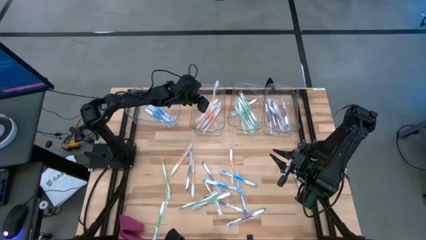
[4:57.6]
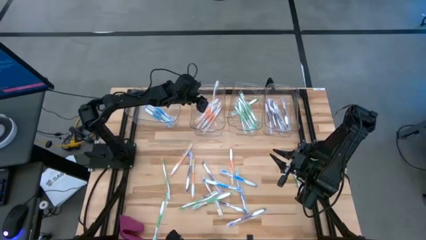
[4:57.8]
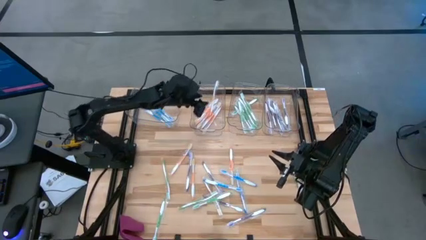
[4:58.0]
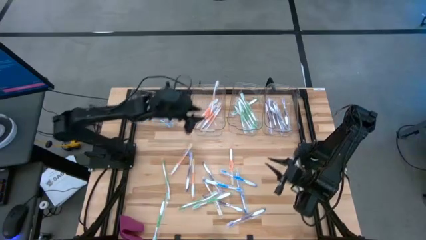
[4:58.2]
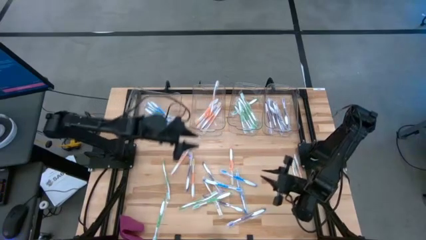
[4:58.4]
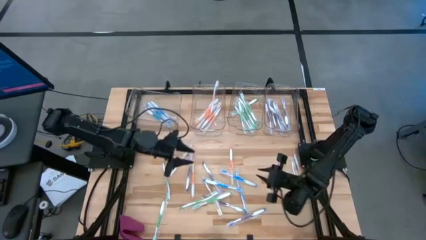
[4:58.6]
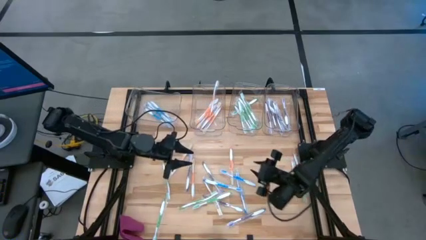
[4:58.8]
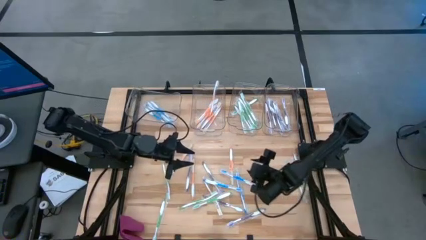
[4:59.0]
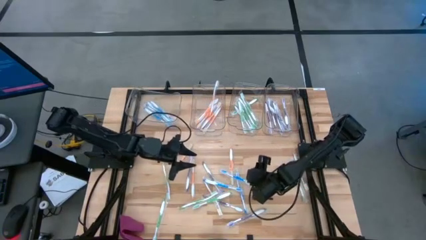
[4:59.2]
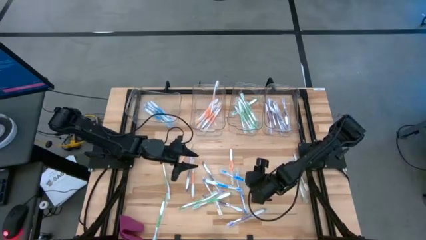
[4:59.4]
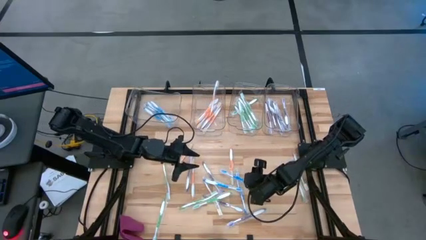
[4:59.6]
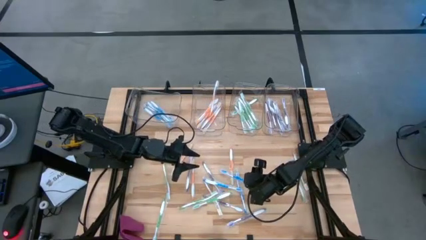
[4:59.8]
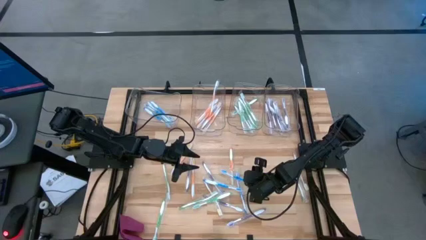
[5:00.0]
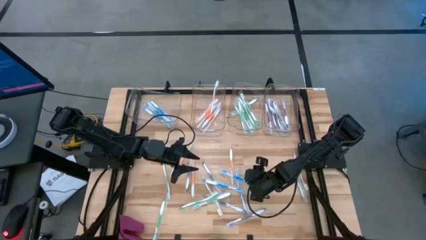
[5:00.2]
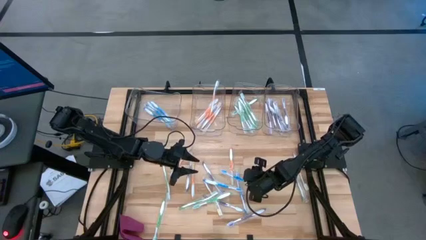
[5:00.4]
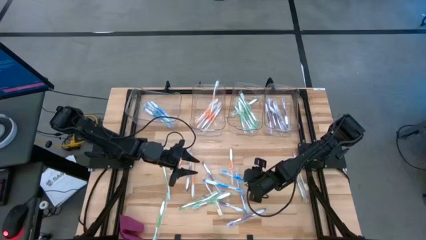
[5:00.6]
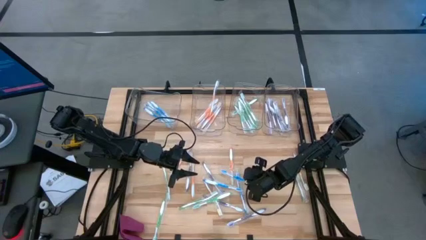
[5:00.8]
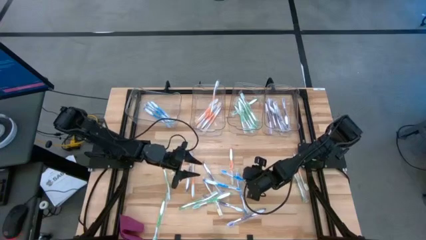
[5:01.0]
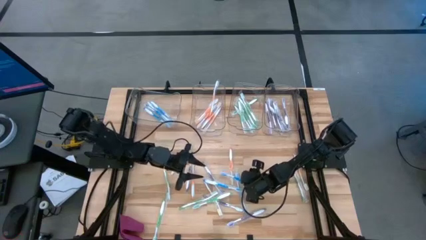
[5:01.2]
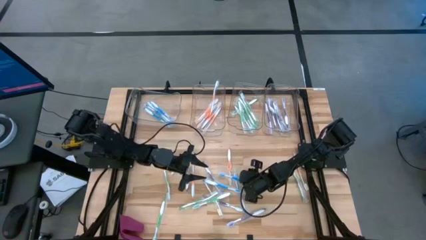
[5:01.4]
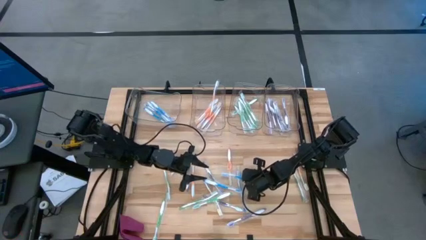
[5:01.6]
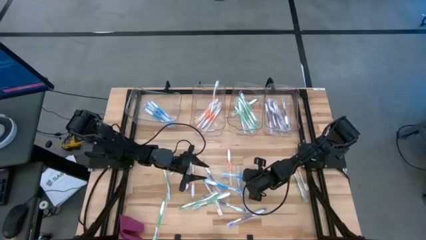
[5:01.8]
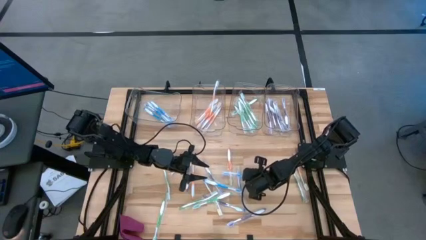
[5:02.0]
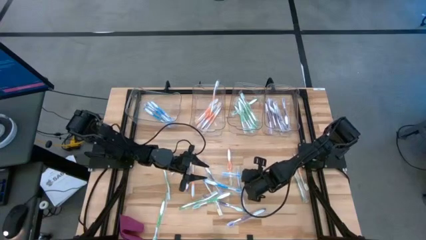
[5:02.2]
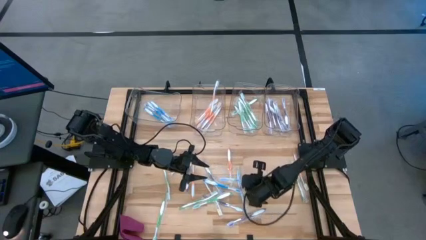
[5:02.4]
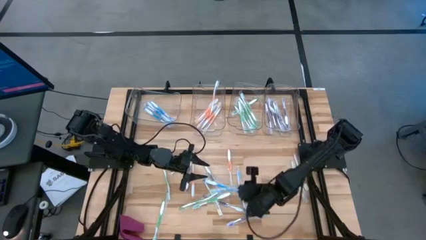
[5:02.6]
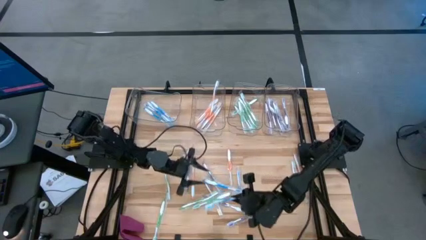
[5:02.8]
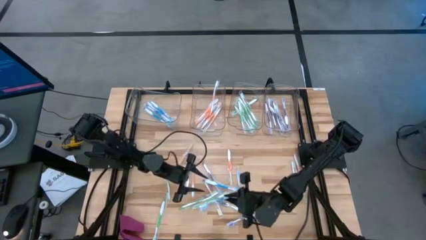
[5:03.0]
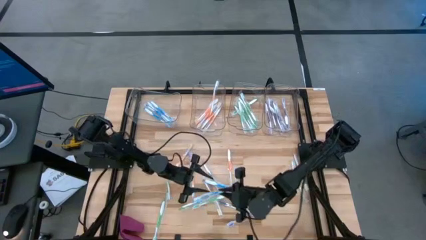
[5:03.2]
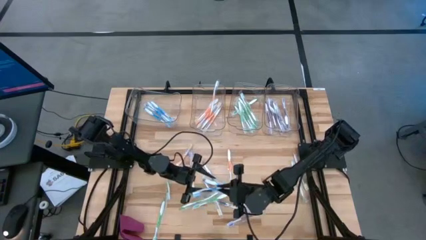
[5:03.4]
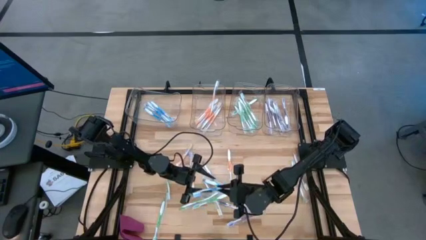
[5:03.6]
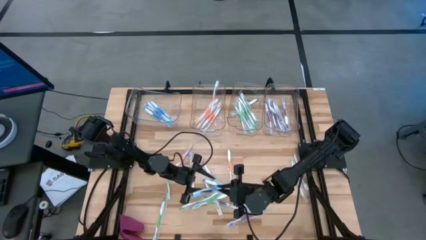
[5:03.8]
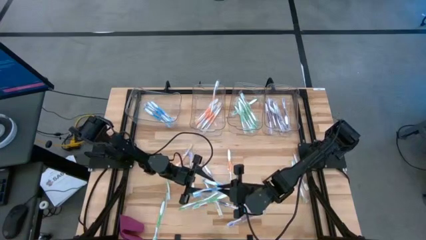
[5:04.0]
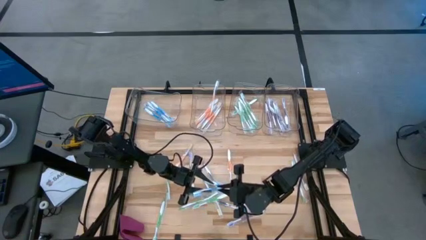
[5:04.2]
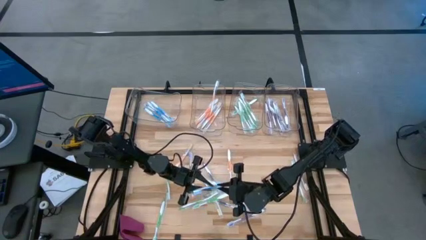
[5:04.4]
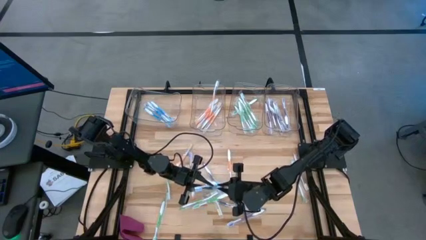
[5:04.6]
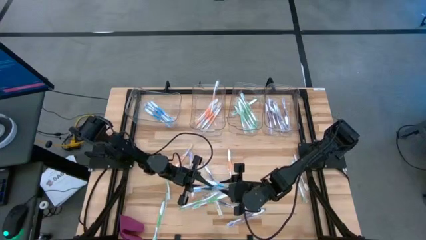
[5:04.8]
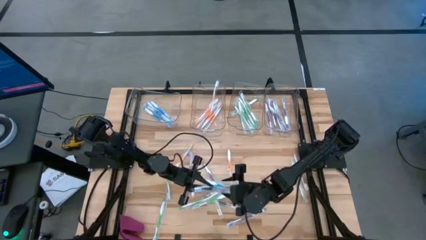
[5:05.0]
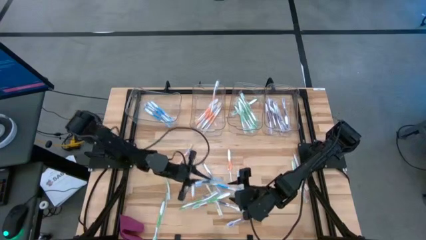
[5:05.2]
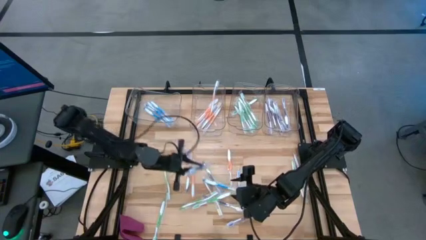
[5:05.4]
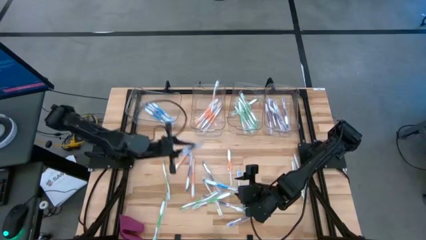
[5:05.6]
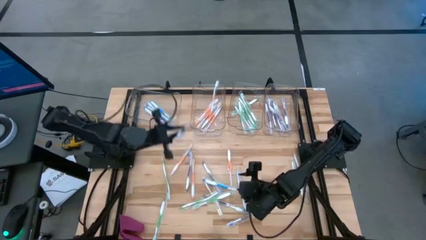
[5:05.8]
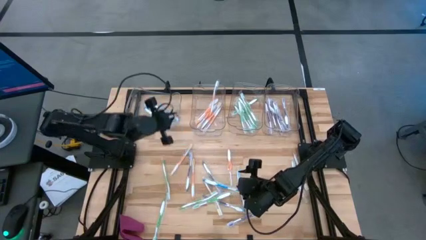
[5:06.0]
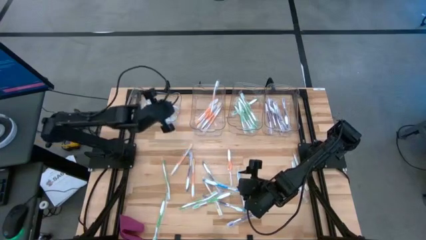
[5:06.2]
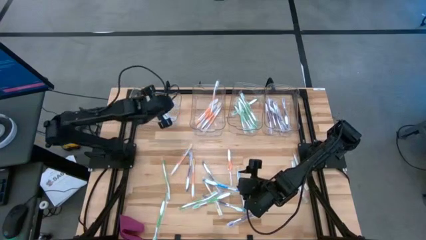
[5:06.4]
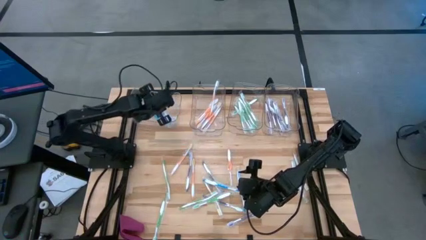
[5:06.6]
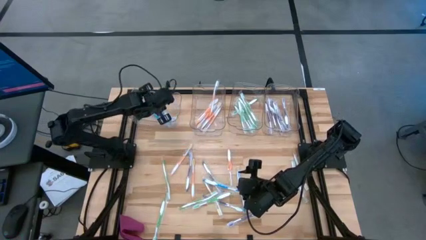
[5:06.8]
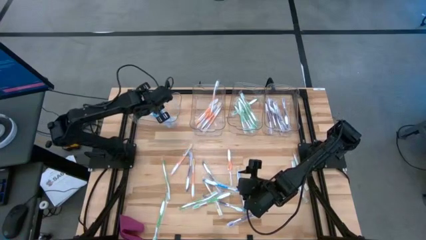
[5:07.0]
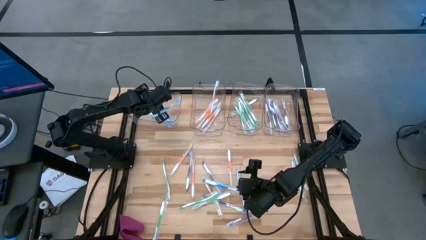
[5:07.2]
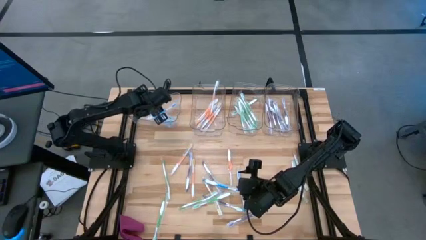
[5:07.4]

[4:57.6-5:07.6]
Task: Pick & Place Toothbrushes
Put the blue toothbrush into the left transparent bin

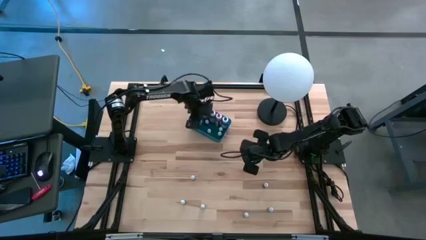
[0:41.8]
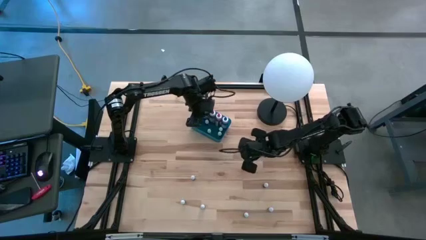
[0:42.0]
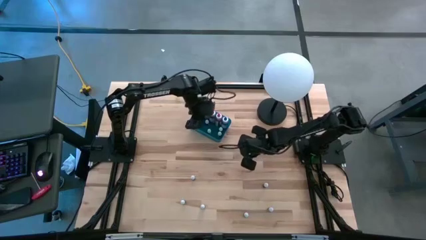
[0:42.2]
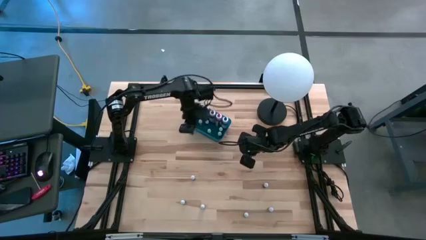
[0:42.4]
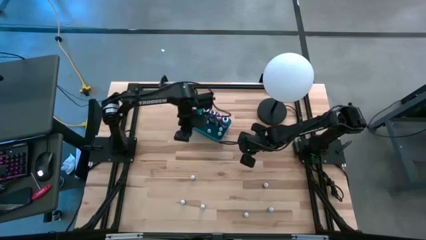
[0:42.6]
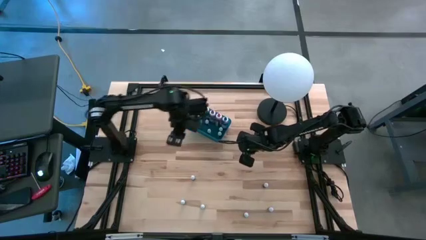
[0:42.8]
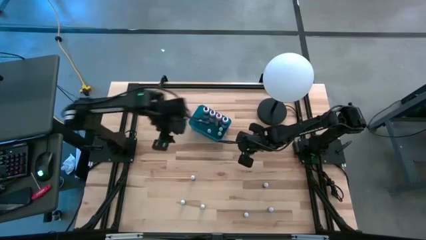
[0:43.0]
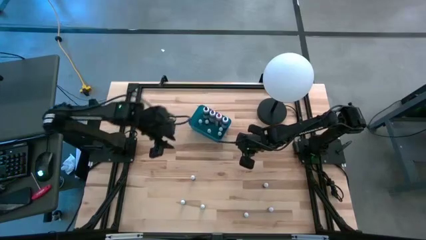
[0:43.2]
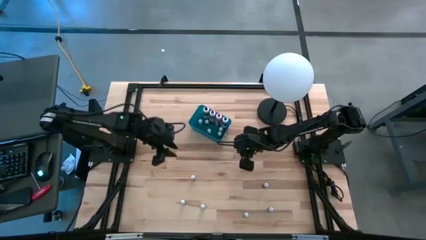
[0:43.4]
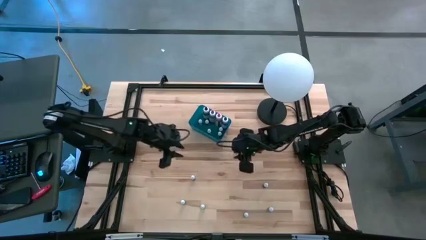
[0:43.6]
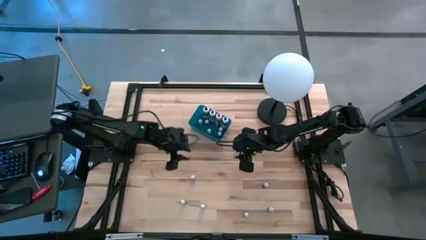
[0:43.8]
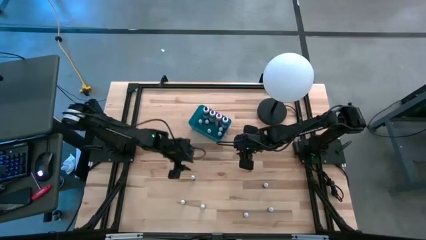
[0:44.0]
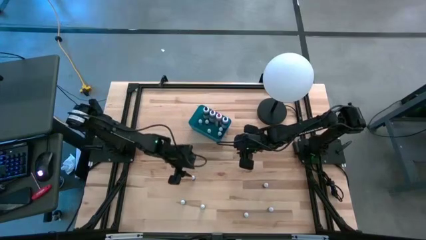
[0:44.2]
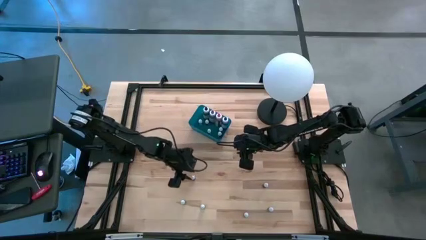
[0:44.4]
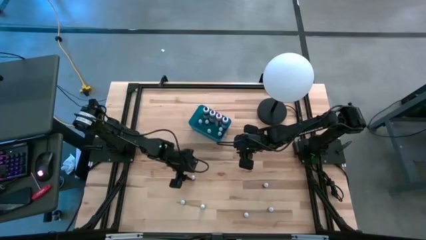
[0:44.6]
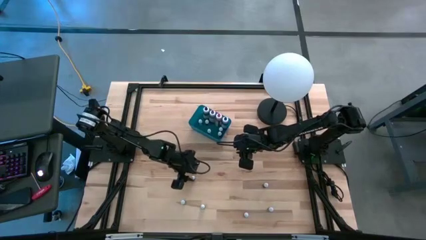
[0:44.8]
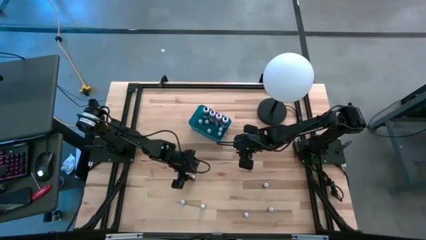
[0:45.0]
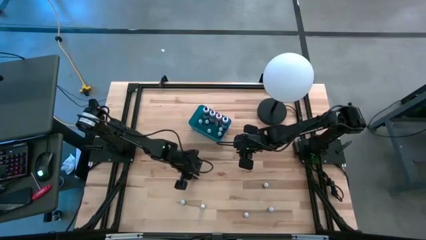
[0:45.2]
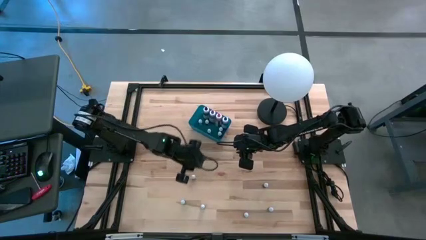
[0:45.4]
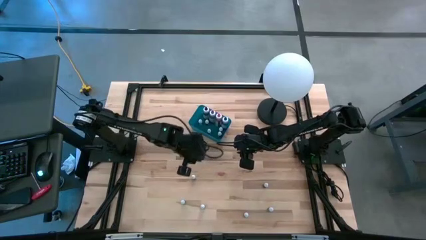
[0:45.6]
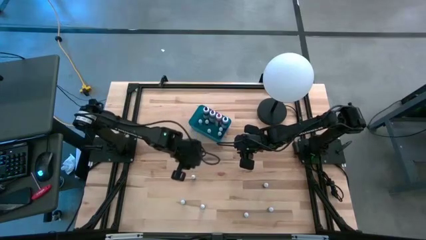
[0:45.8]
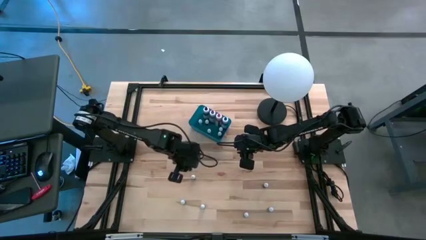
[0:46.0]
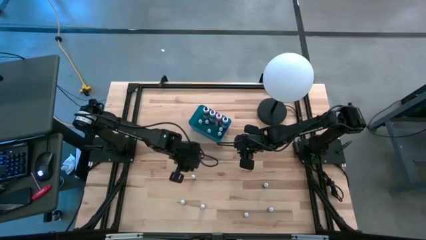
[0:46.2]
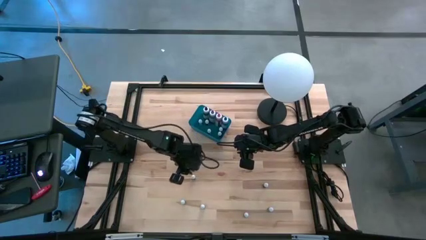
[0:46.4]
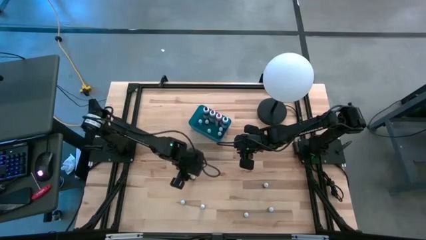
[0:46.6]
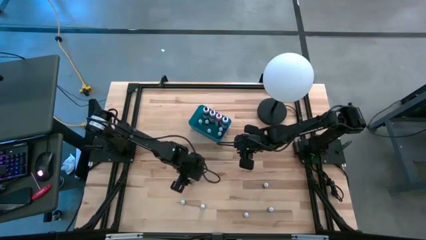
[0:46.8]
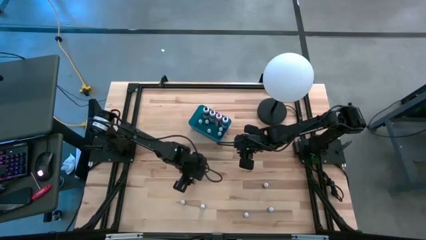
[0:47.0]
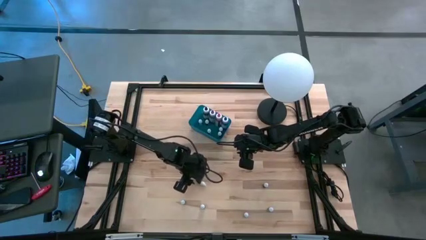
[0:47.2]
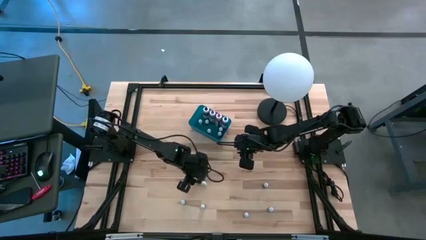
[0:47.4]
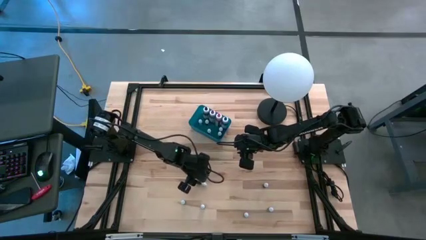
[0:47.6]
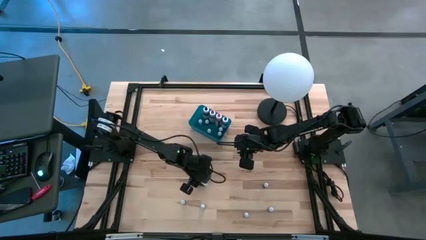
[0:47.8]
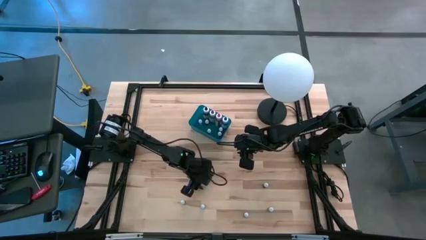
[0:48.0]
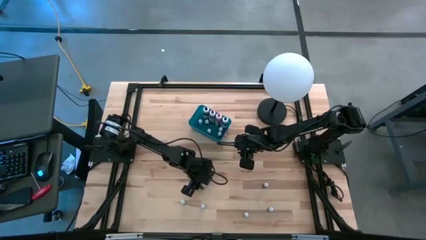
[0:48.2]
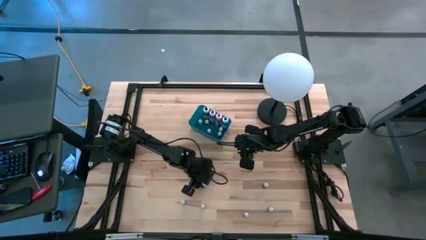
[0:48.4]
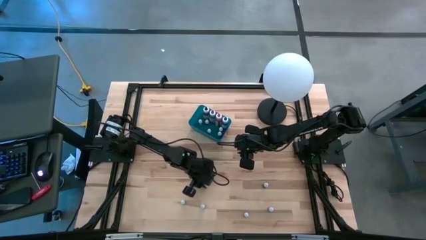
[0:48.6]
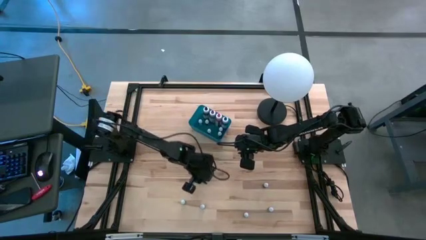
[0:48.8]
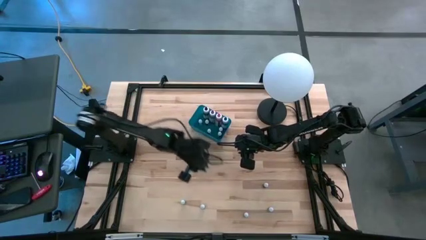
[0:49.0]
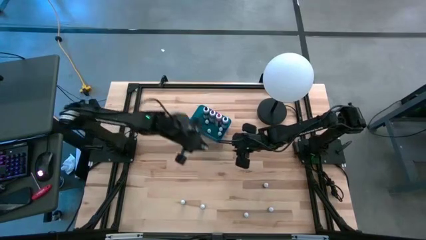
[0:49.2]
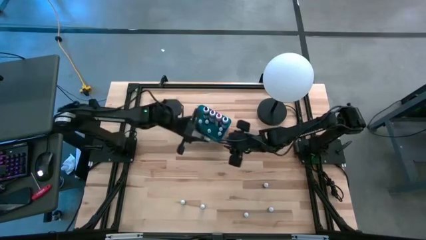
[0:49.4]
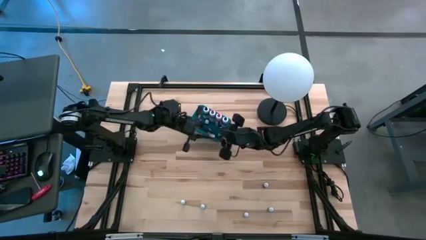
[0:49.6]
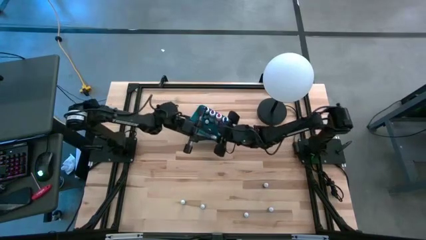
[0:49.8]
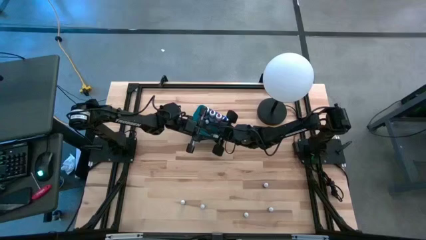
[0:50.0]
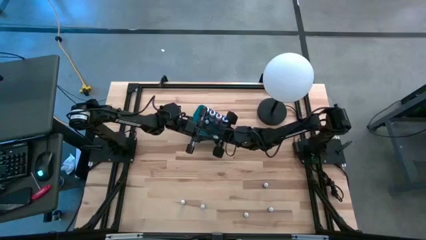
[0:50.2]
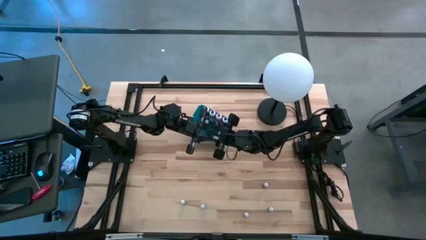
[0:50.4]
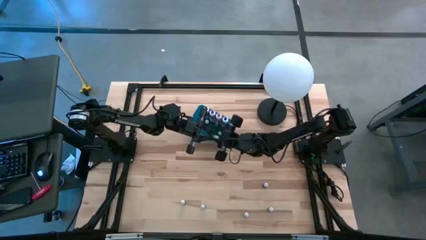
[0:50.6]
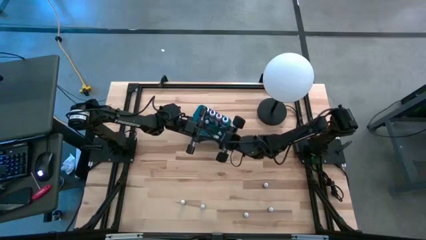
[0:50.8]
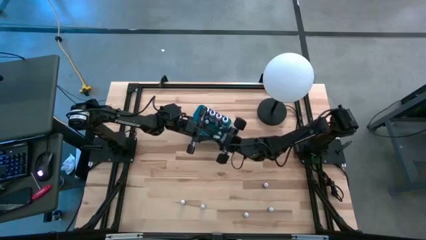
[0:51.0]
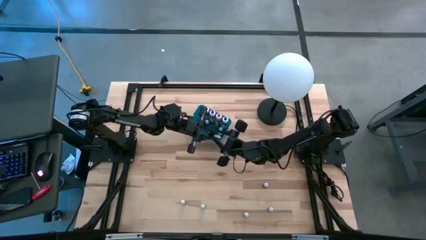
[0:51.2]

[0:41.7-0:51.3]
Task: Pick & Place food coloring
Put the small purple food coloring bottle into the blue bin
